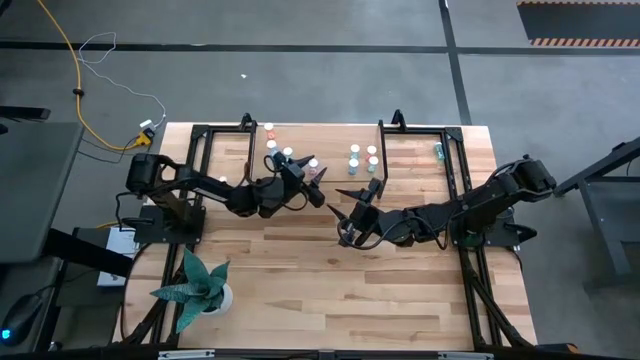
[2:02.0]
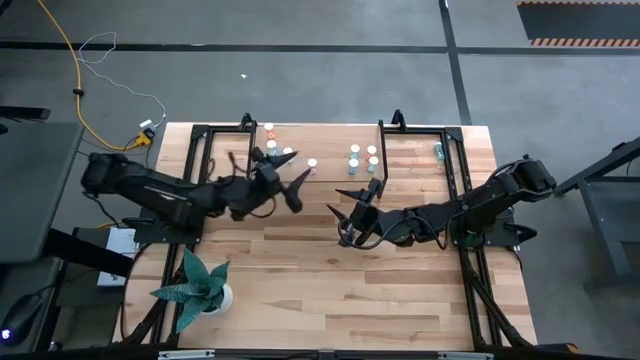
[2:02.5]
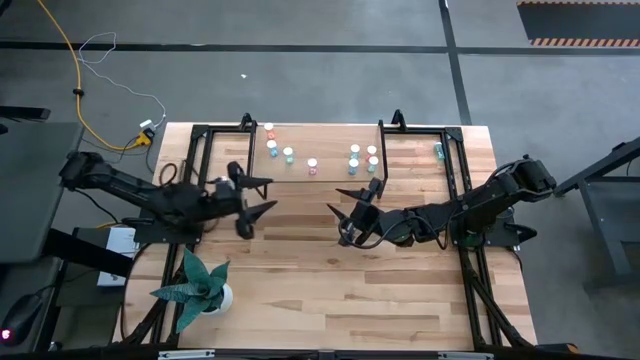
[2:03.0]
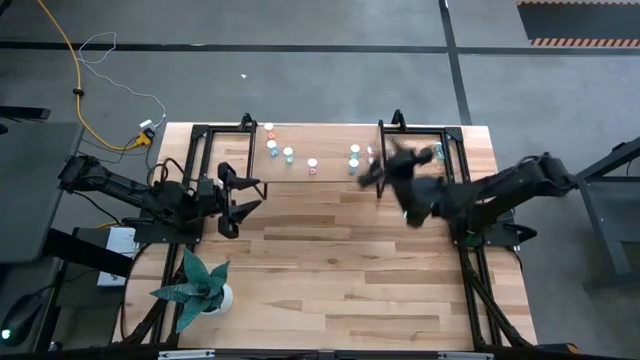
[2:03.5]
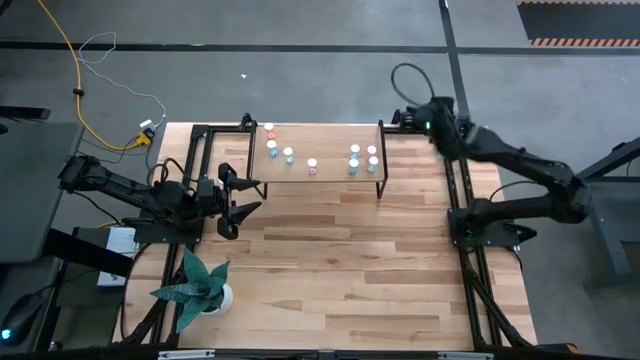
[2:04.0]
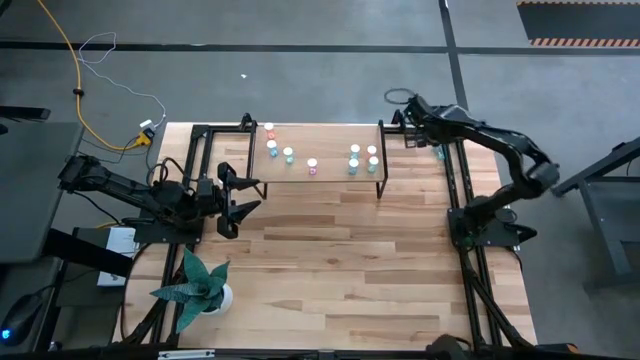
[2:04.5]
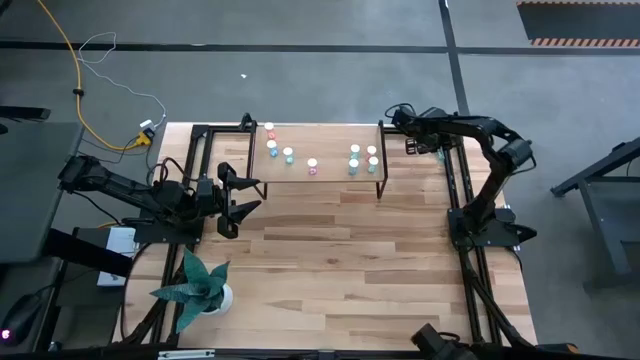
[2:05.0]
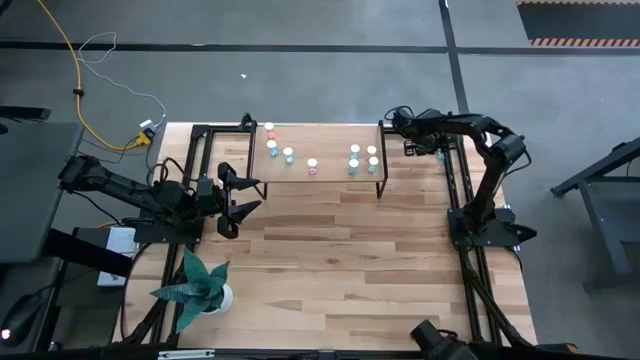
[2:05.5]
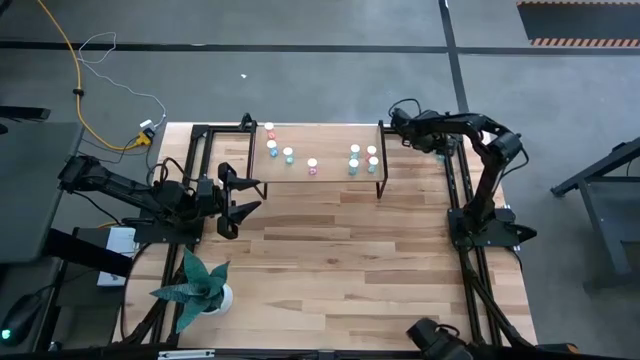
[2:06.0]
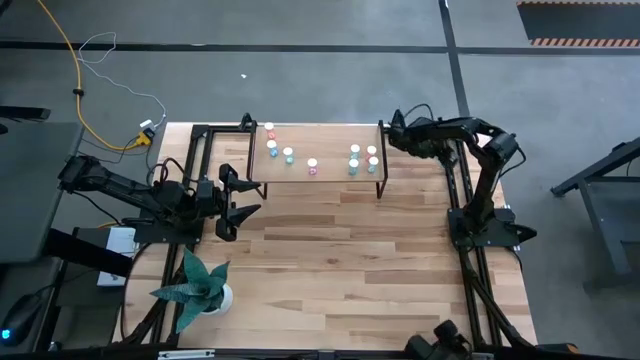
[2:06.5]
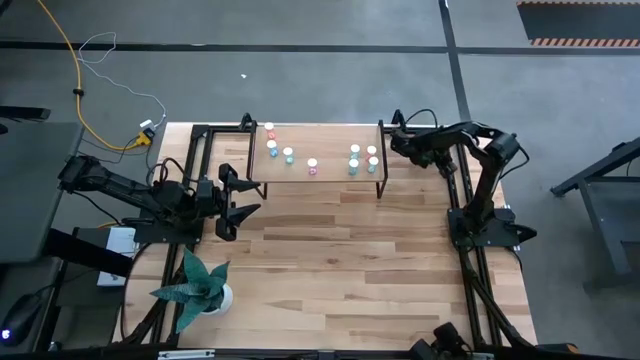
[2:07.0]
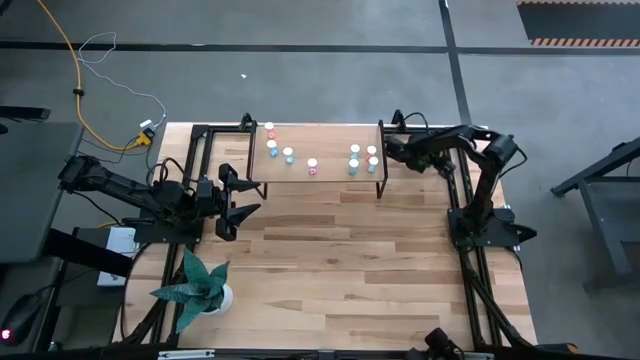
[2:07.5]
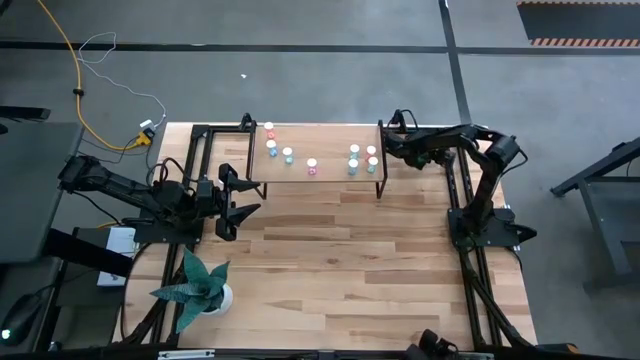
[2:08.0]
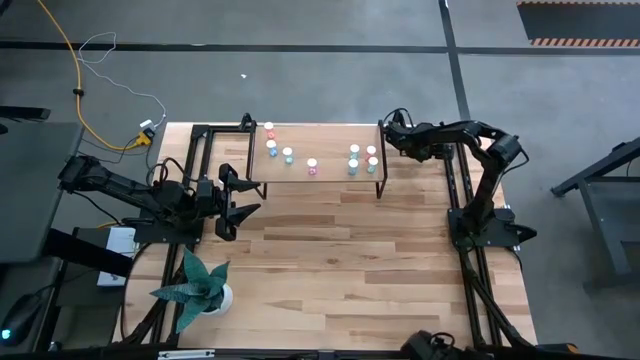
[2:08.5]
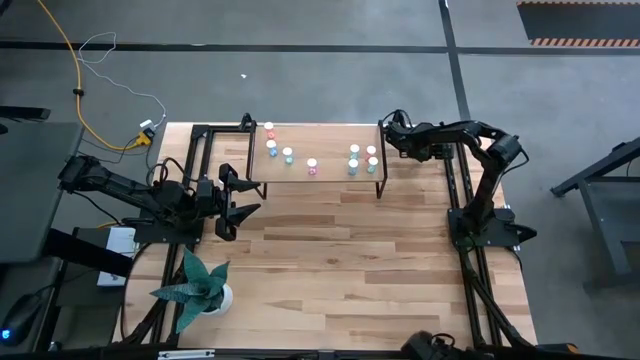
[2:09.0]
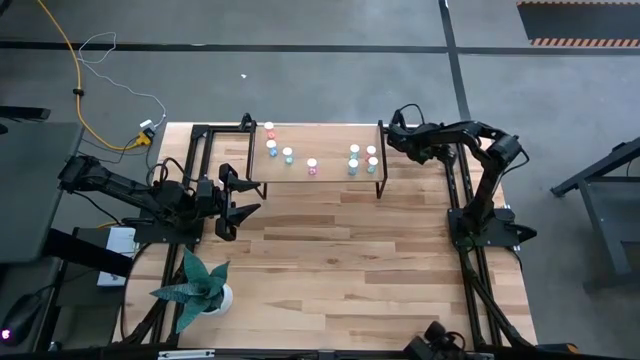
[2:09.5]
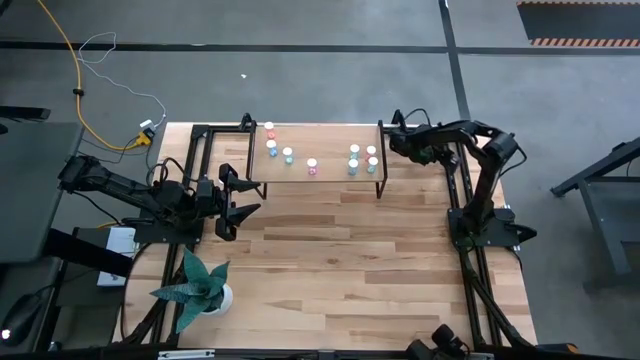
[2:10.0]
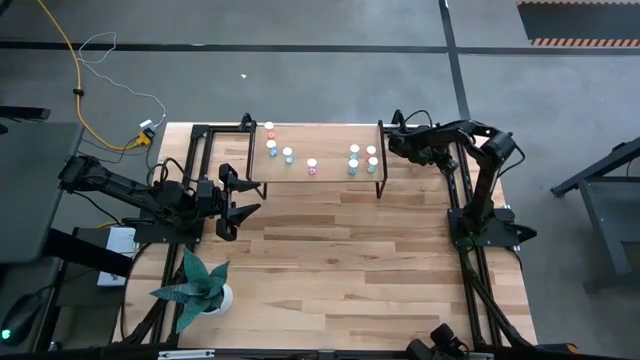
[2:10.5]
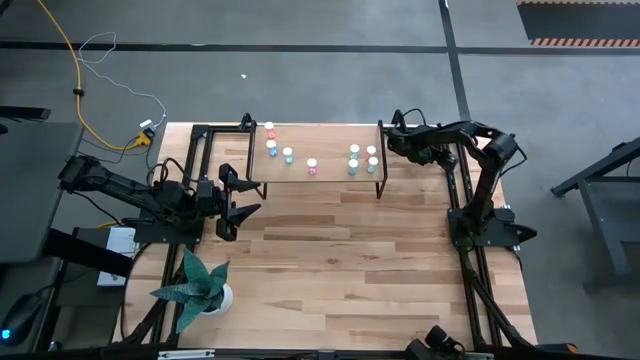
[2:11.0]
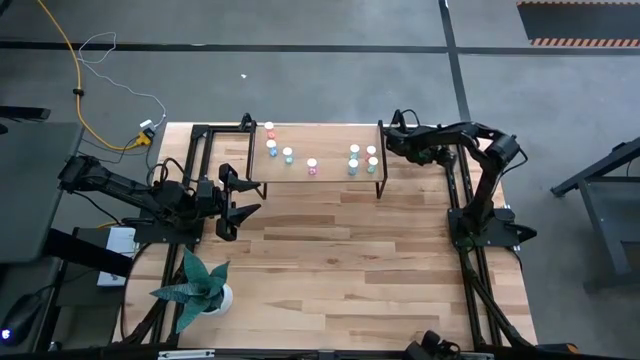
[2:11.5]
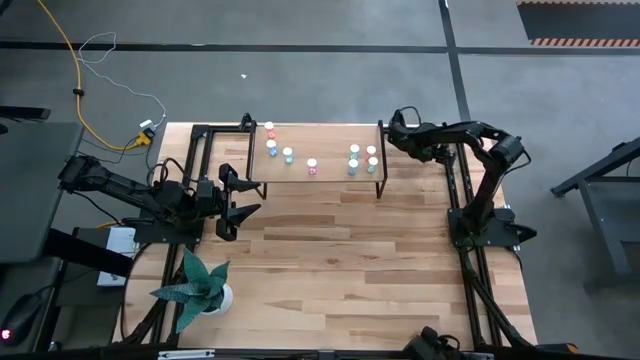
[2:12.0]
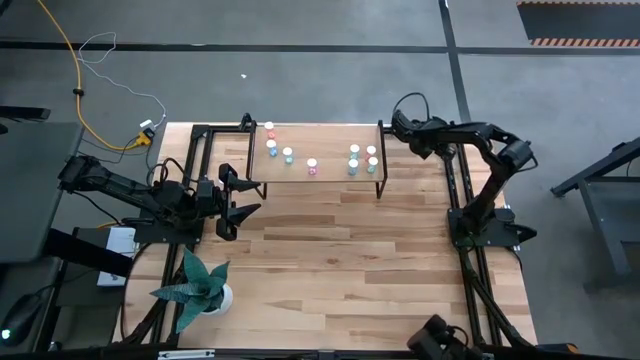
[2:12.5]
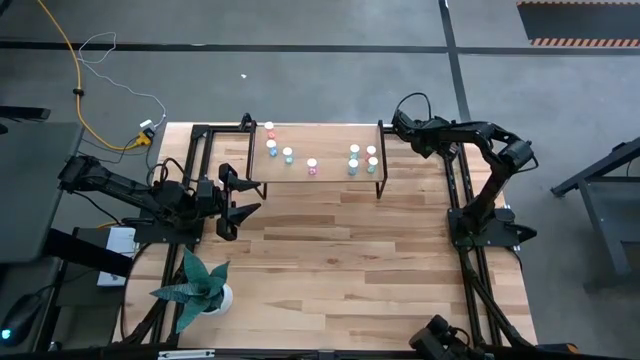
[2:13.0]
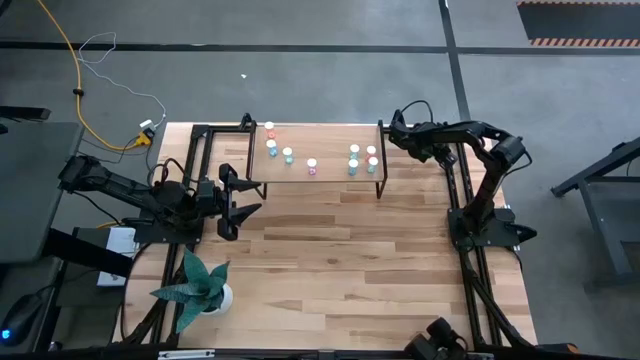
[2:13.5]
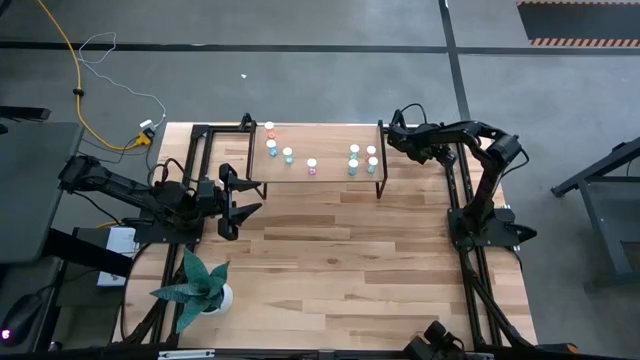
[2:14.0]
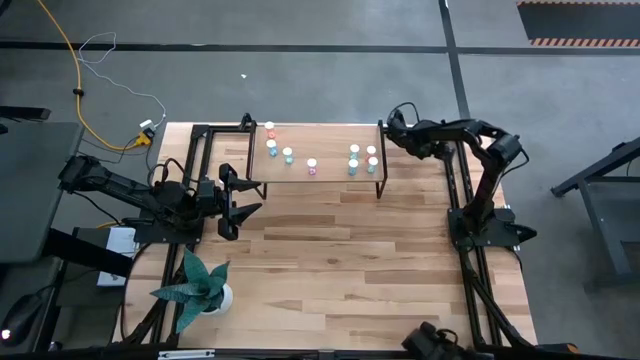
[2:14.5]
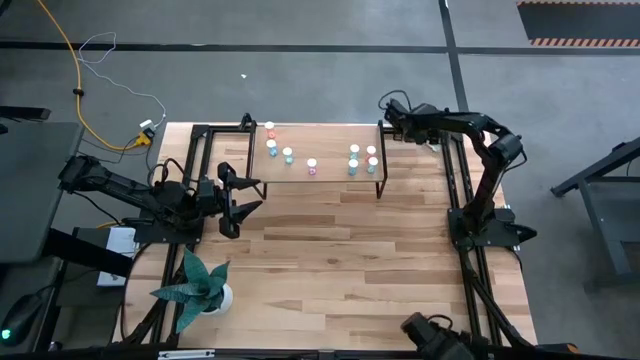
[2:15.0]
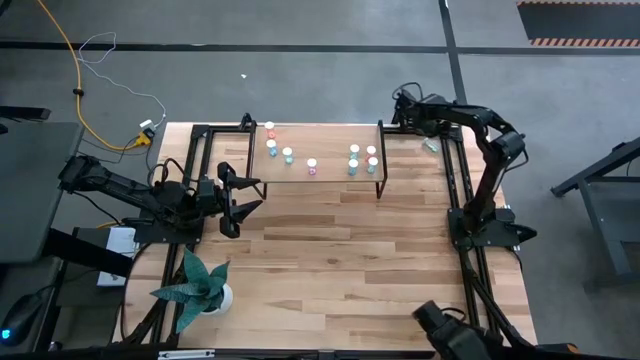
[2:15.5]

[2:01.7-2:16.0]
Task: Pick and place medicine bottles onto shelf by color
Put the green pill bottle on the shelf

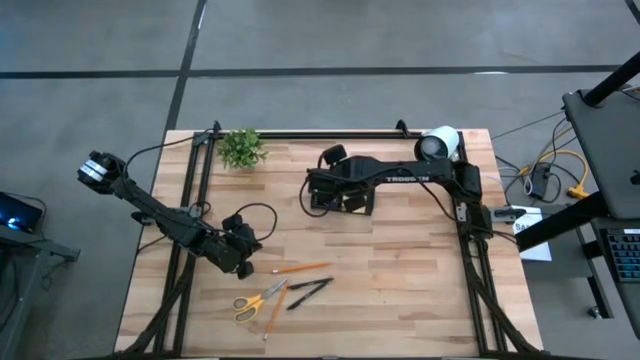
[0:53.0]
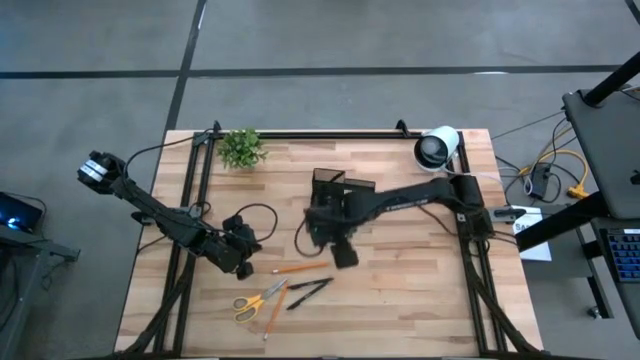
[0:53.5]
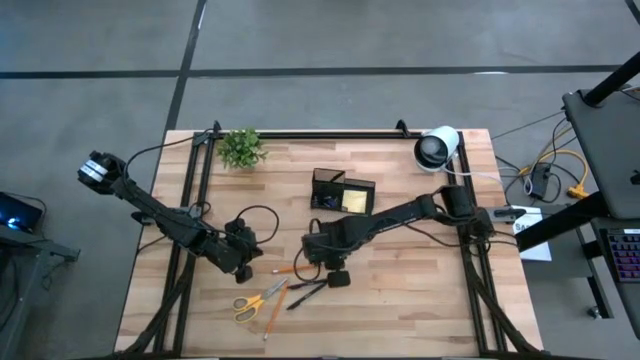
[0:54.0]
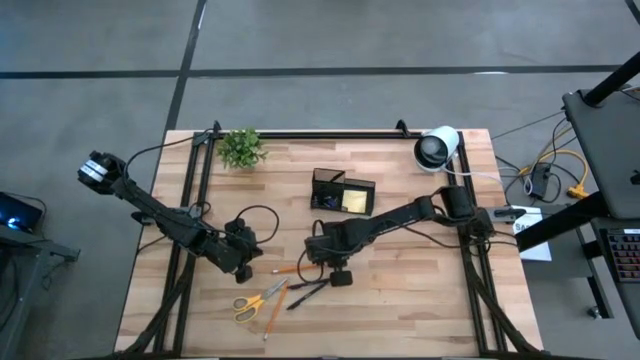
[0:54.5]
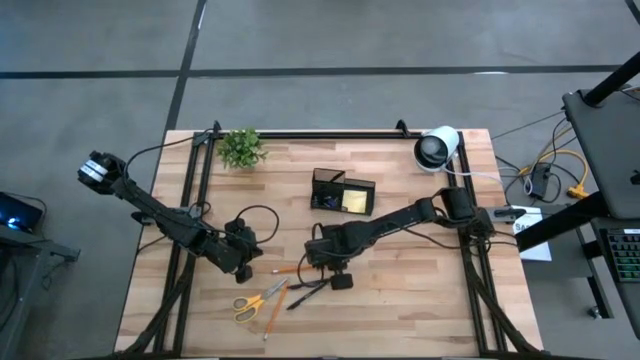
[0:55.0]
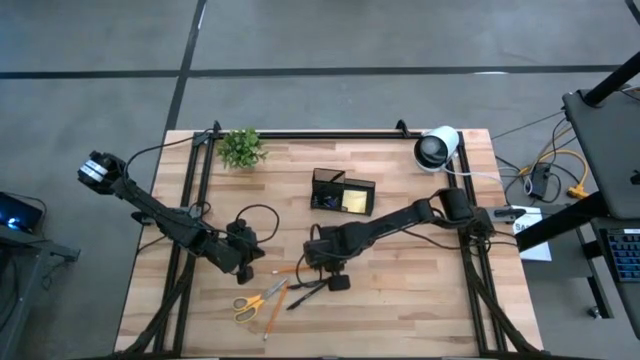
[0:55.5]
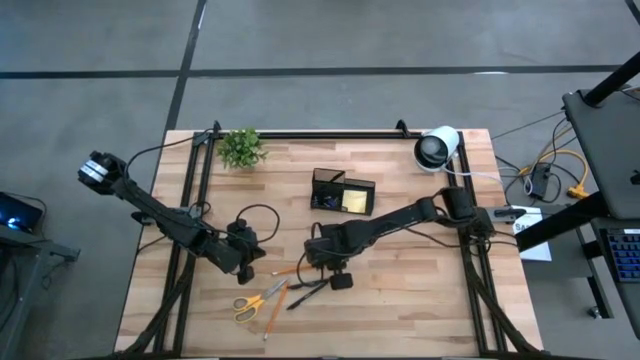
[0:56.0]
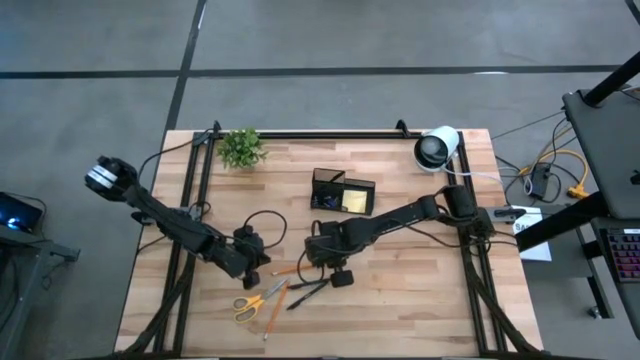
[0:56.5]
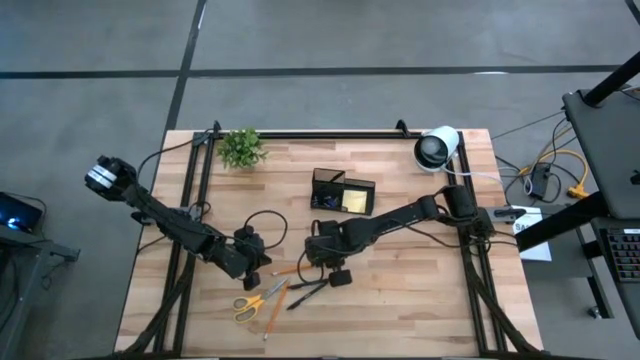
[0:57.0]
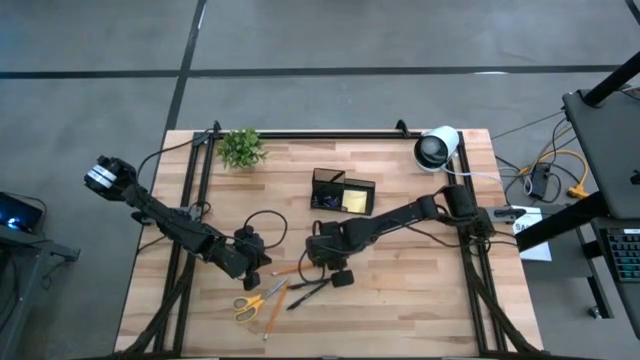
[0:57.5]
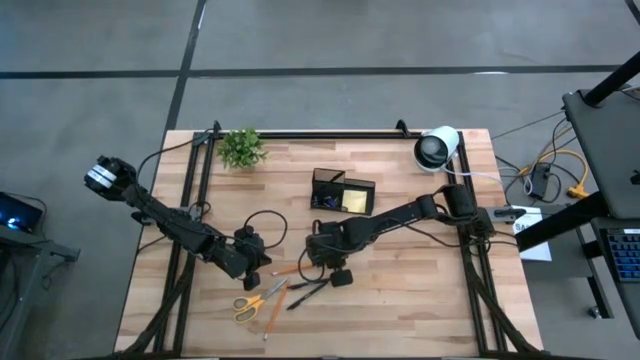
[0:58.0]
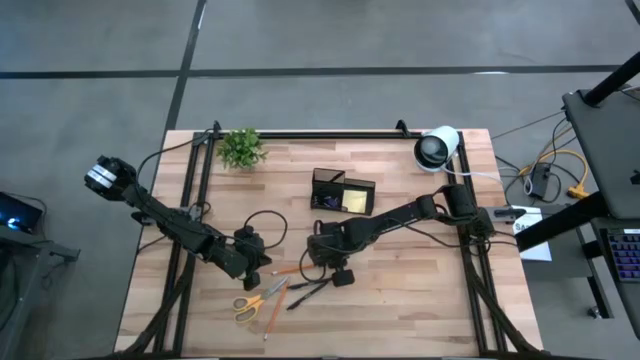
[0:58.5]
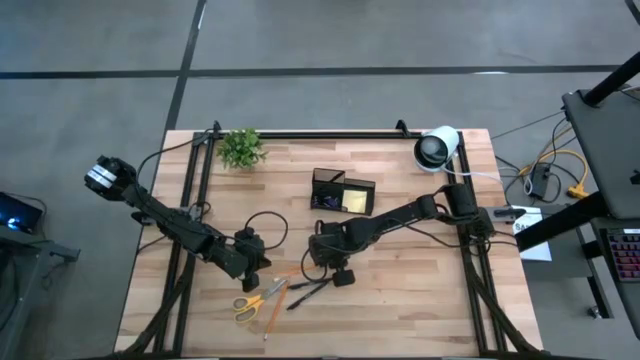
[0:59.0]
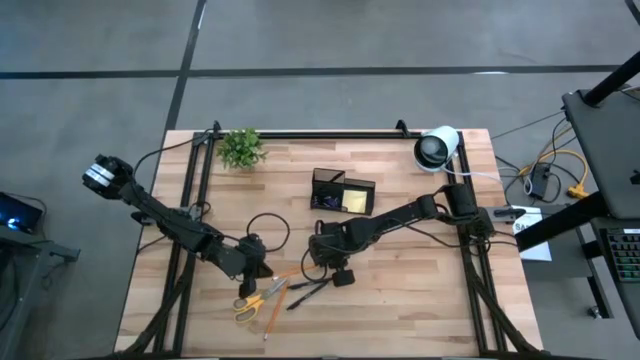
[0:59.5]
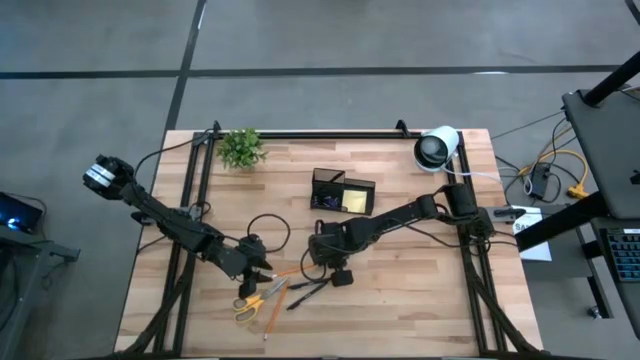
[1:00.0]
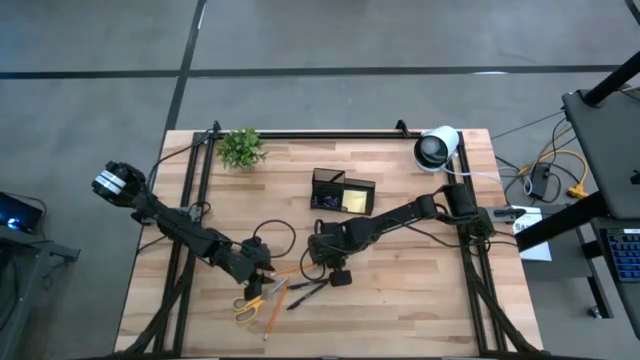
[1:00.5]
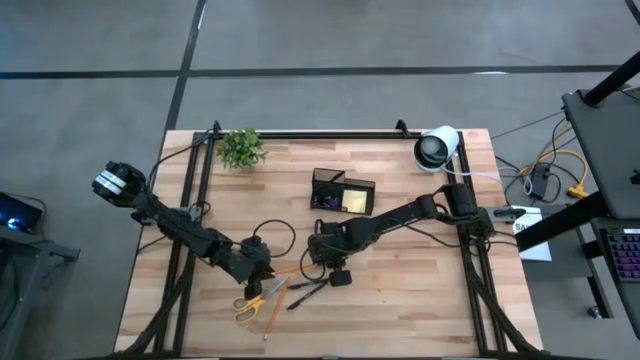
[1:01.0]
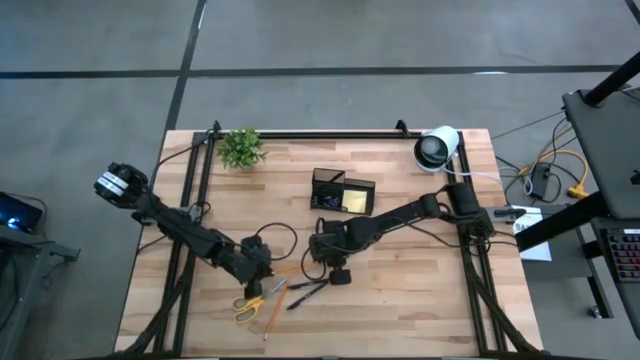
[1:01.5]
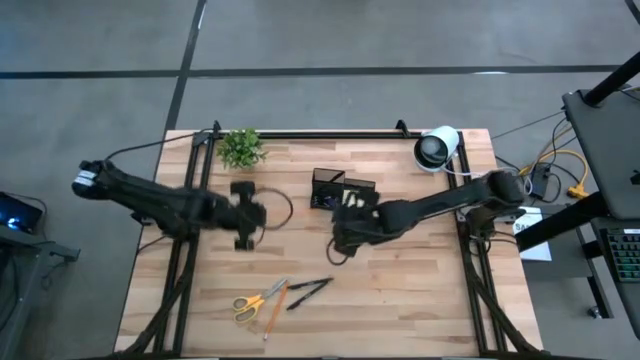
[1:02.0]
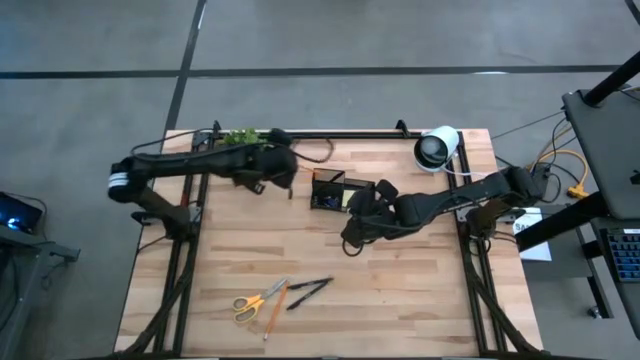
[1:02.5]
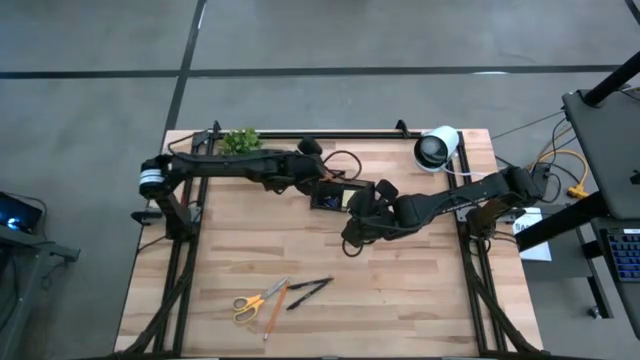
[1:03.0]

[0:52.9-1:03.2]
Task: Pick and place office supplies into organizer
Put the top orange pencil into the black desk organizer
